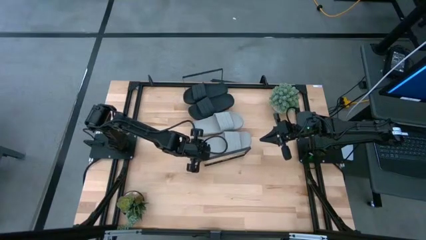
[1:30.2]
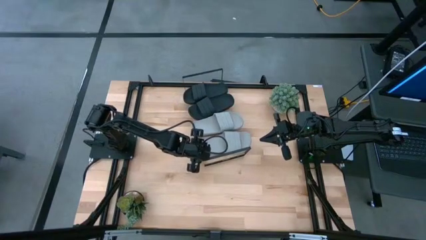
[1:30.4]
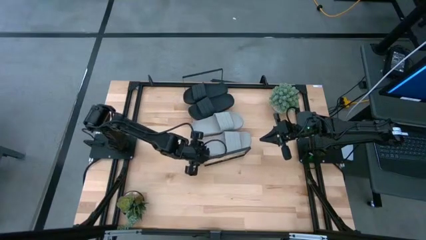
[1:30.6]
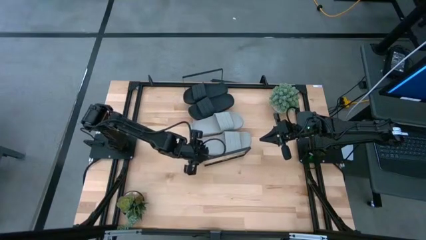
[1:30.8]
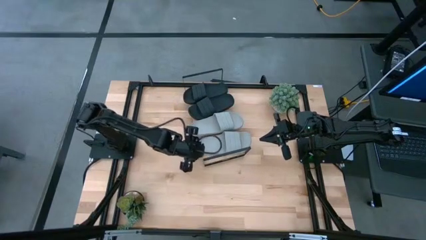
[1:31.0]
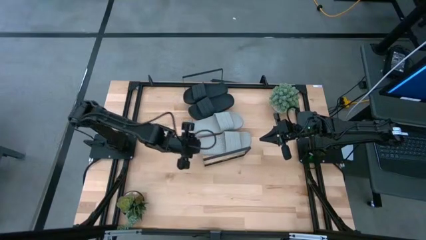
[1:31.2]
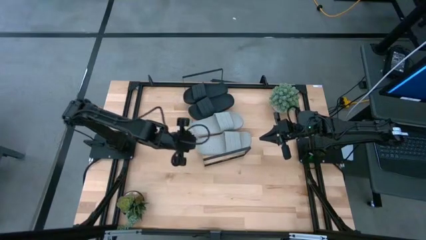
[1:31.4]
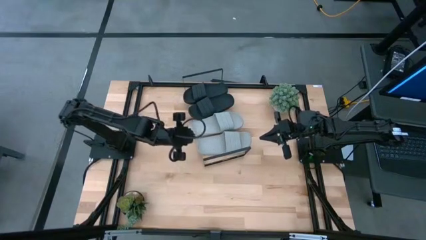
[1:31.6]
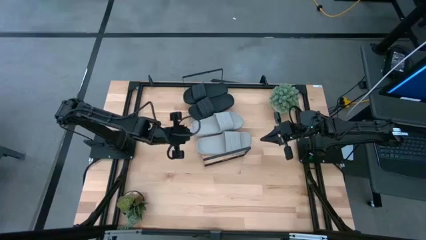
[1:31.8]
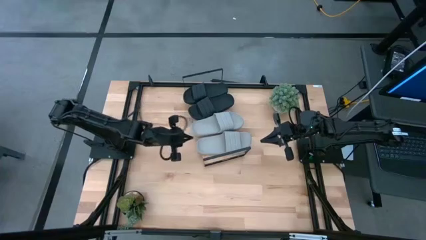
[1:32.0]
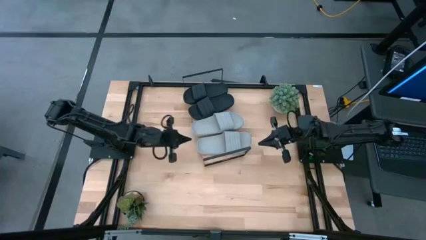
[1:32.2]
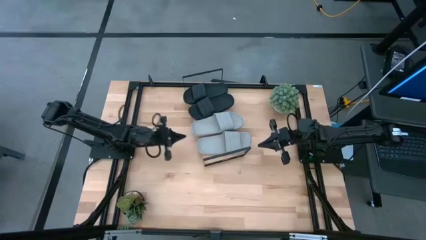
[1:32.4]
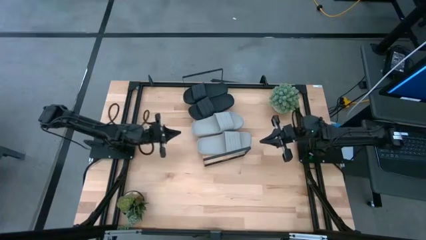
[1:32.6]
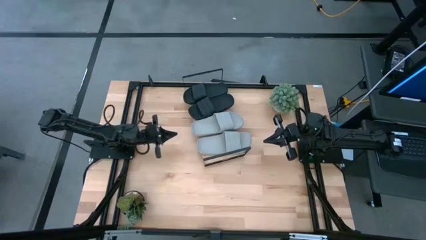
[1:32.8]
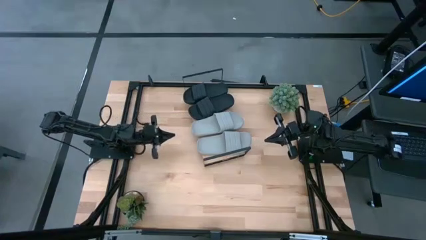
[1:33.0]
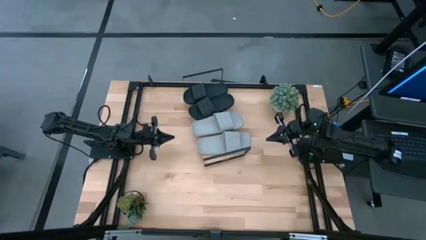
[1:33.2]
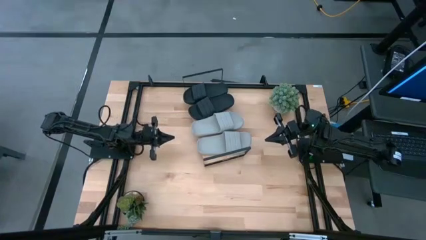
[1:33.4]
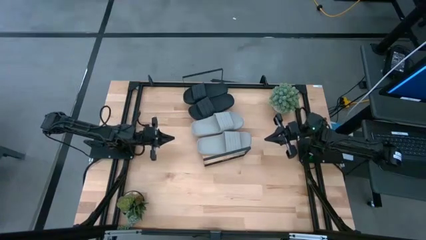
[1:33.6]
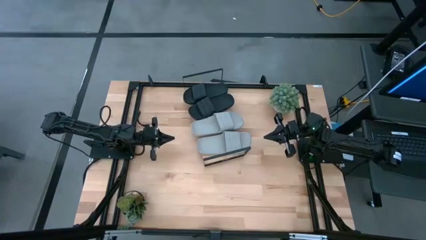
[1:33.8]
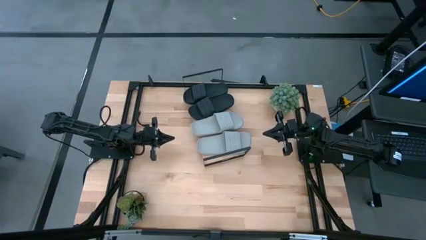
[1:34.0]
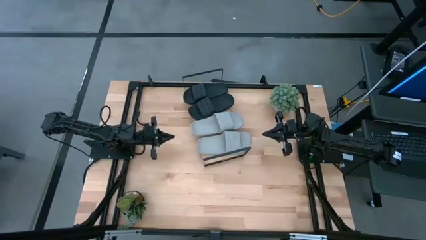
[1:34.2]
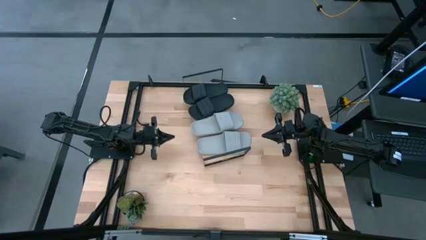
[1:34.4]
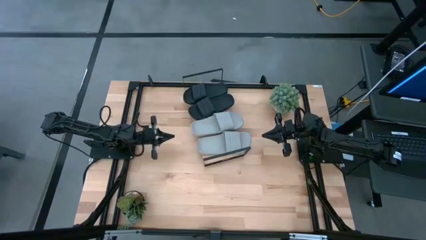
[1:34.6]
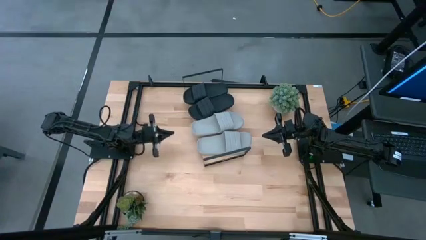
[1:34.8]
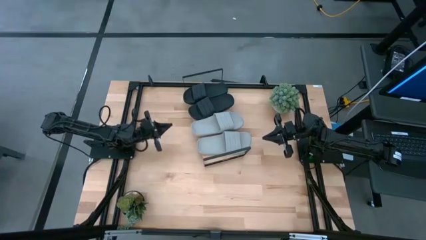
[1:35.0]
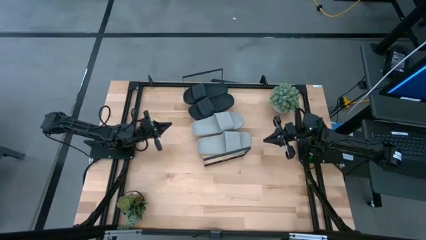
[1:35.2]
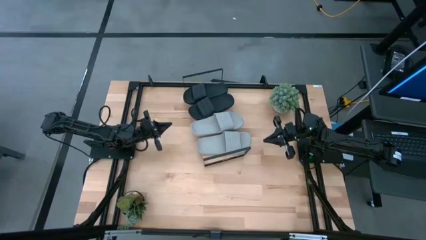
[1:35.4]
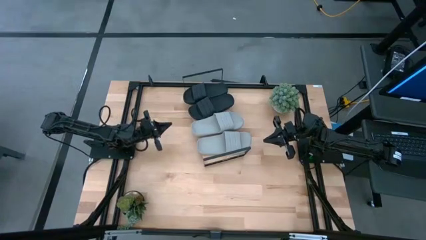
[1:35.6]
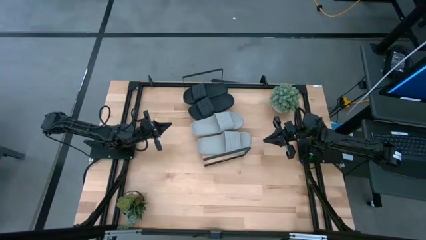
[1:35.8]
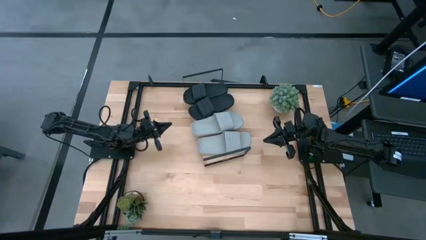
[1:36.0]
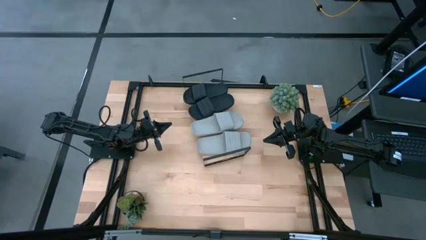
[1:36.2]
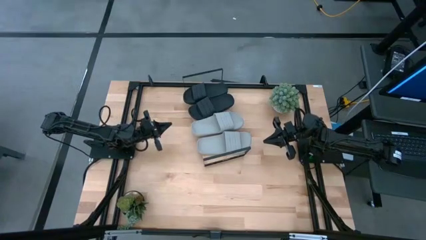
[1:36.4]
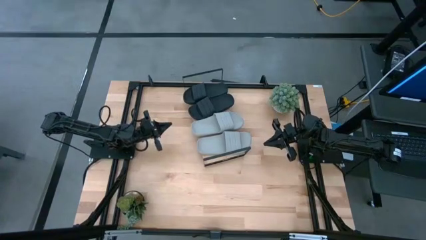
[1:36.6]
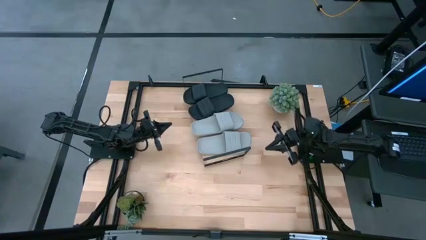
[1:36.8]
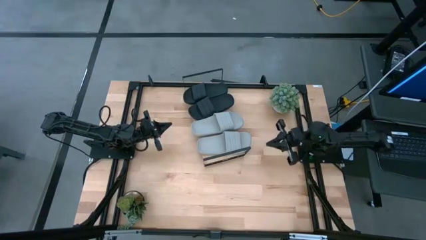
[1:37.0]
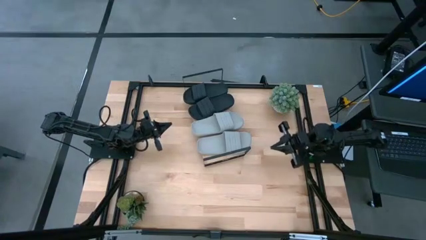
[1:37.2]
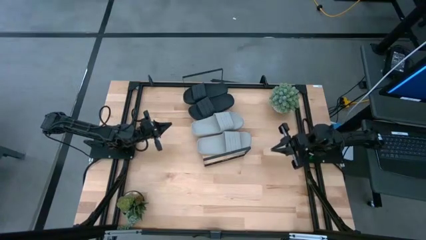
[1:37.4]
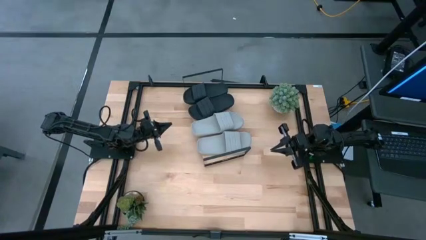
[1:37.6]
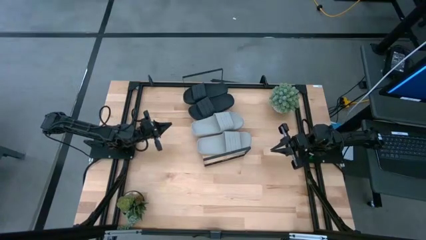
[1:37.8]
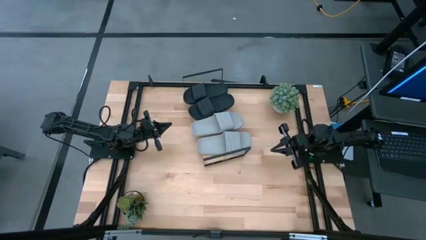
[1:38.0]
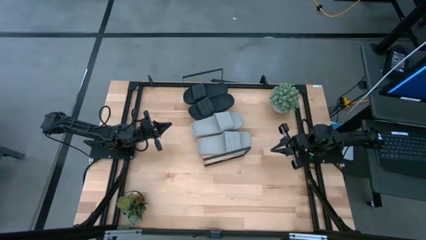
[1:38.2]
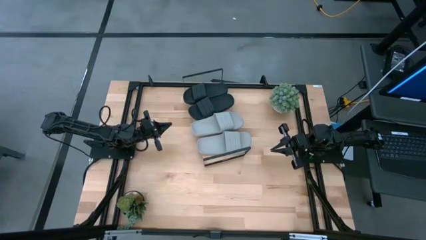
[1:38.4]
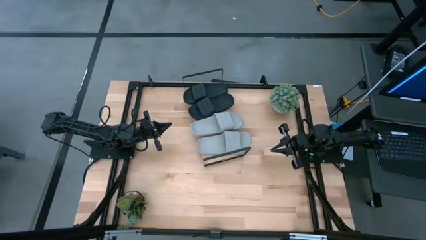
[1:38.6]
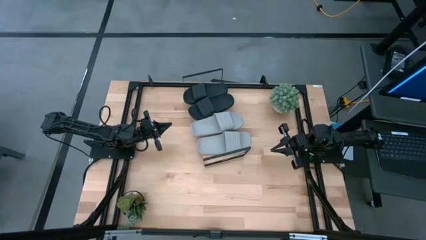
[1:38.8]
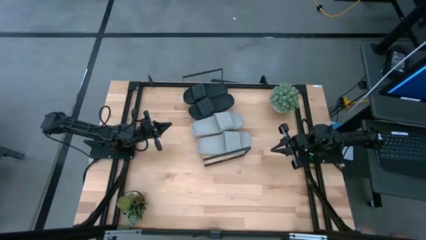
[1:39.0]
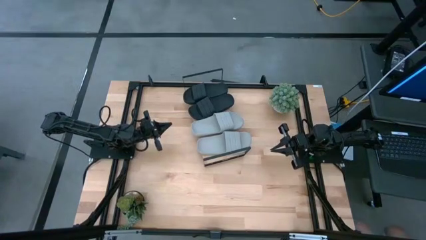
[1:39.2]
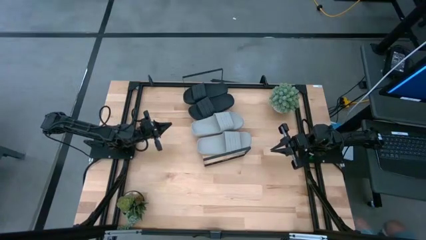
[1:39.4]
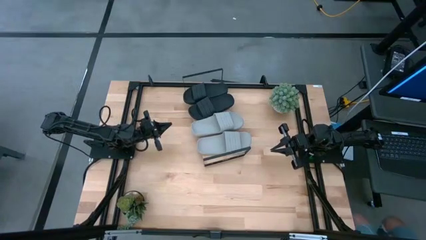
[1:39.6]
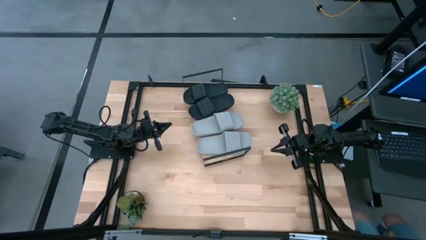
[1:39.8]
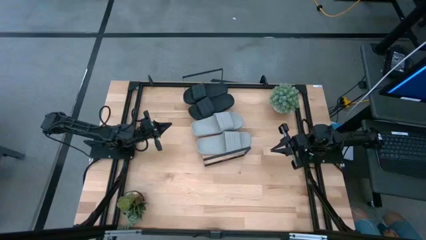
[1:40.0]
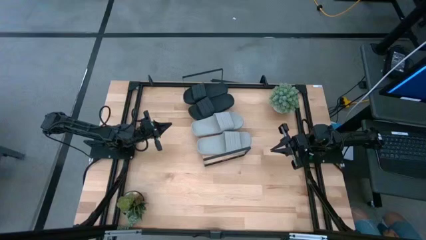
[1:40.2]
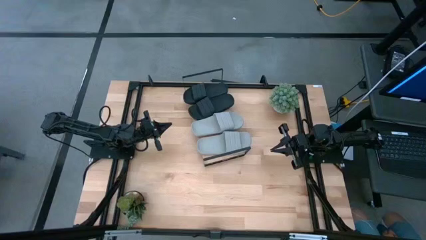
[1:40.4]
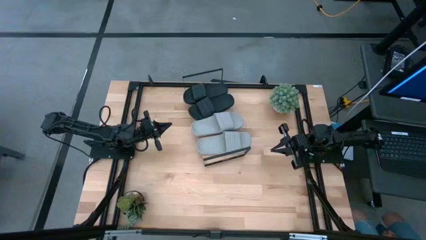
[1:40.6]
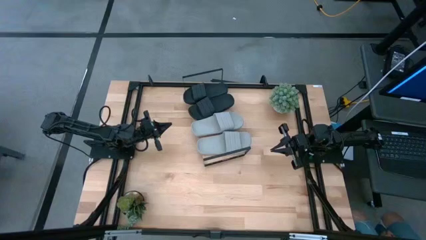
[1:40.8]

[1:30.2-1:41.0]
Task: Pick and place slides into the shelf
Return to Home Position

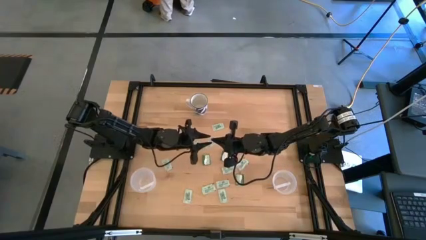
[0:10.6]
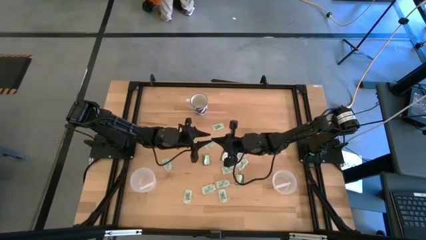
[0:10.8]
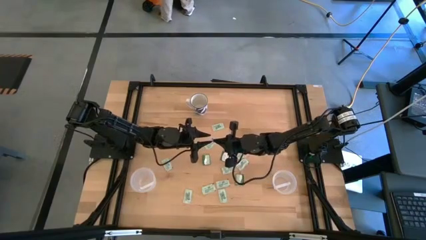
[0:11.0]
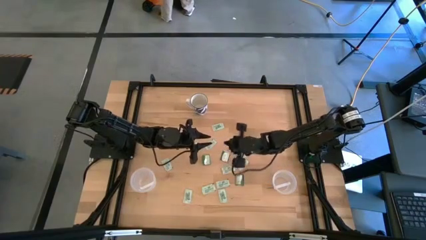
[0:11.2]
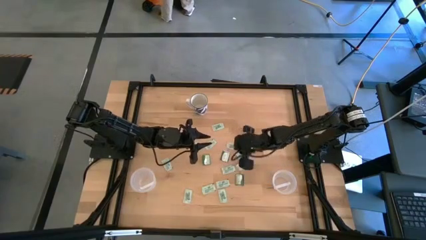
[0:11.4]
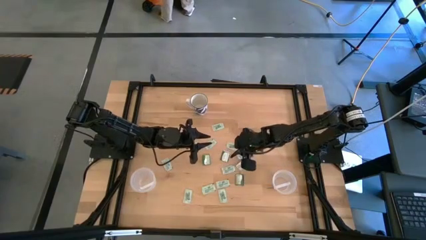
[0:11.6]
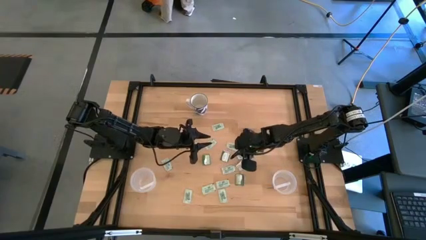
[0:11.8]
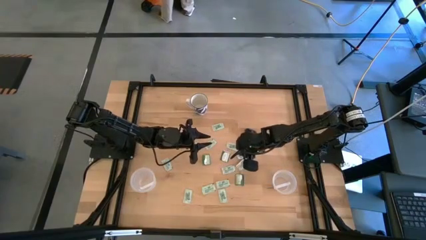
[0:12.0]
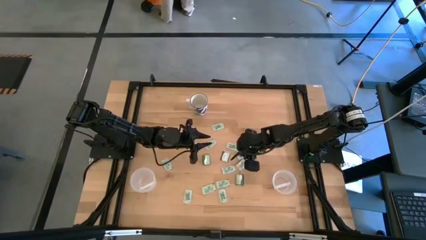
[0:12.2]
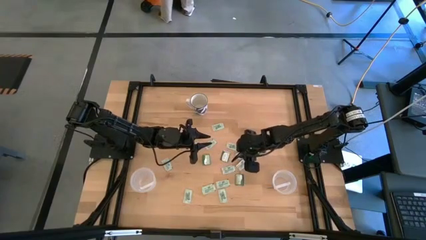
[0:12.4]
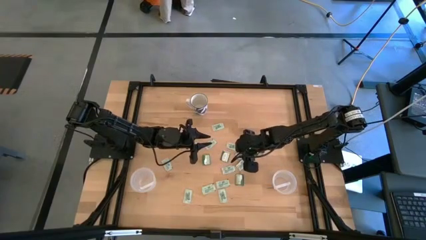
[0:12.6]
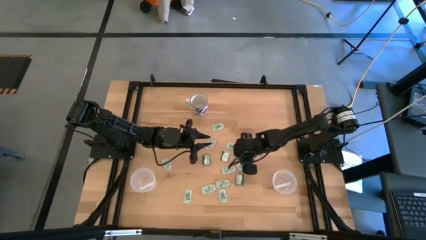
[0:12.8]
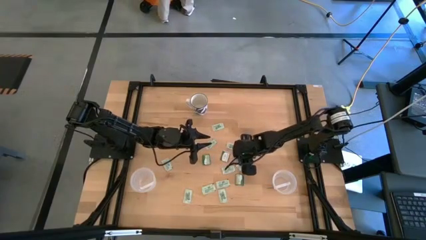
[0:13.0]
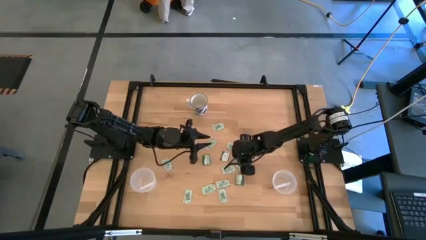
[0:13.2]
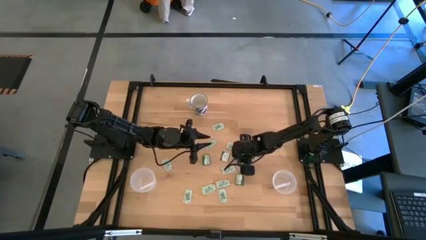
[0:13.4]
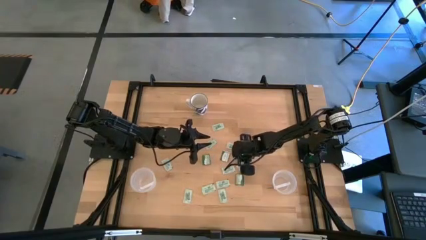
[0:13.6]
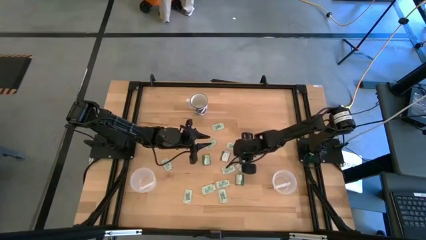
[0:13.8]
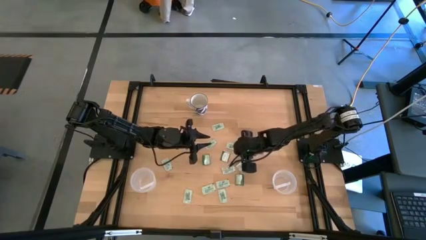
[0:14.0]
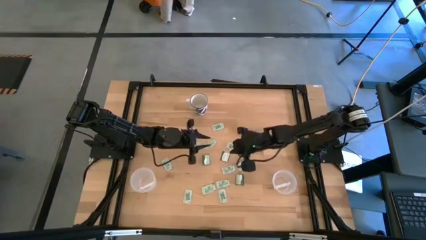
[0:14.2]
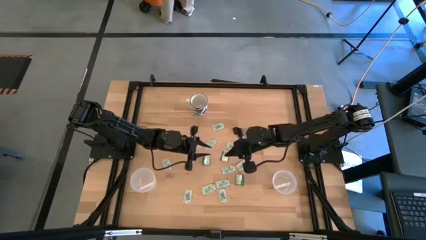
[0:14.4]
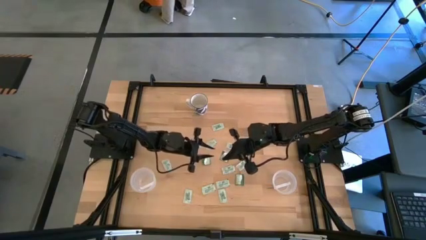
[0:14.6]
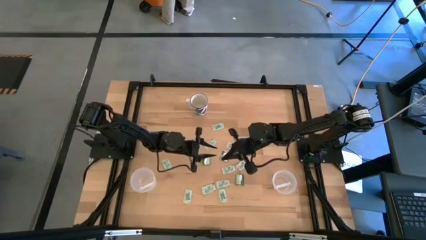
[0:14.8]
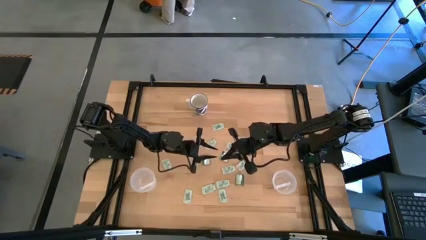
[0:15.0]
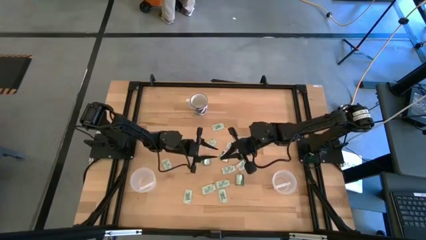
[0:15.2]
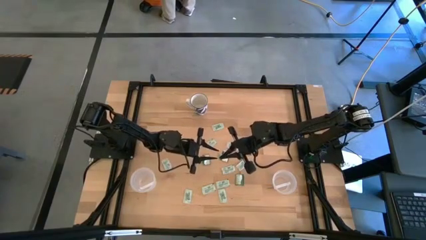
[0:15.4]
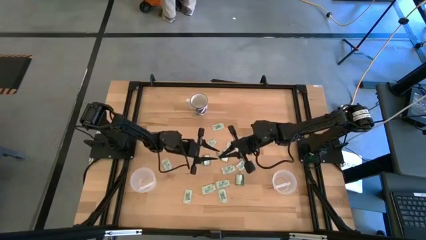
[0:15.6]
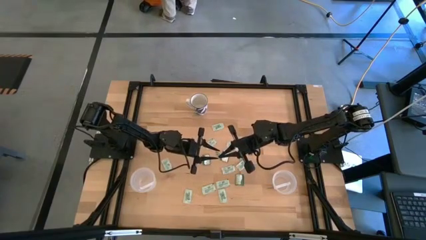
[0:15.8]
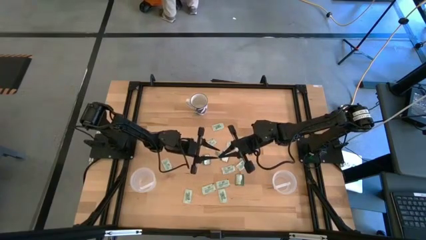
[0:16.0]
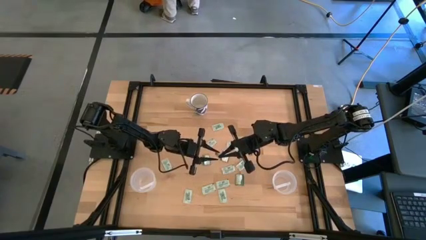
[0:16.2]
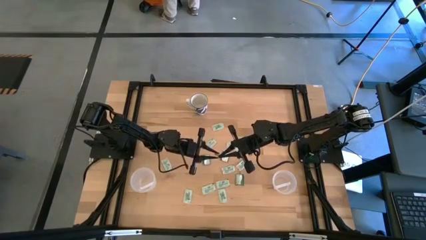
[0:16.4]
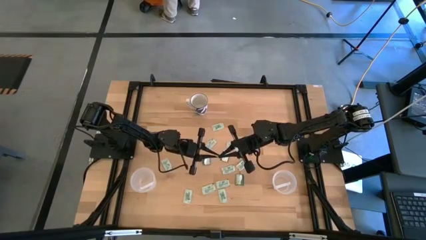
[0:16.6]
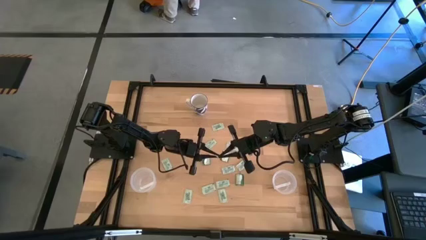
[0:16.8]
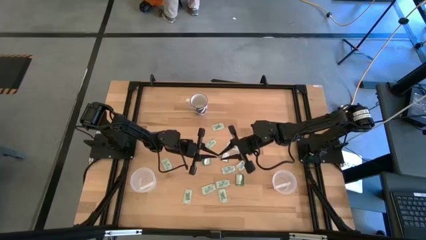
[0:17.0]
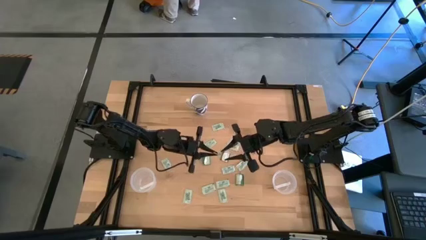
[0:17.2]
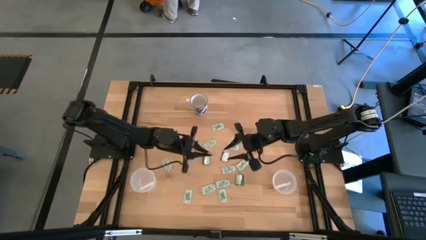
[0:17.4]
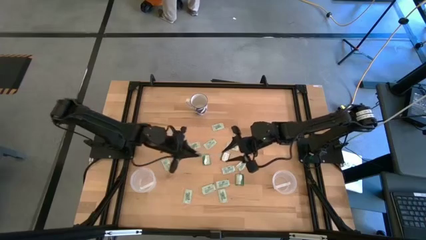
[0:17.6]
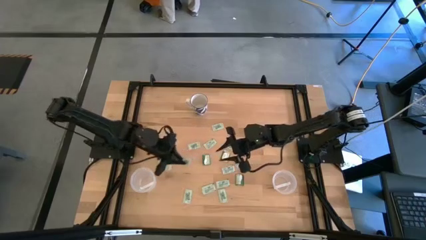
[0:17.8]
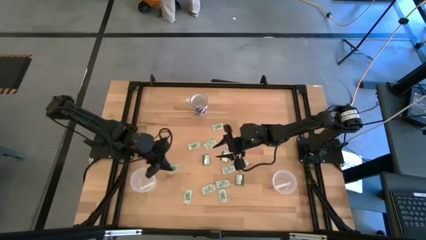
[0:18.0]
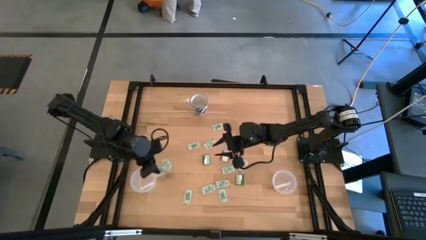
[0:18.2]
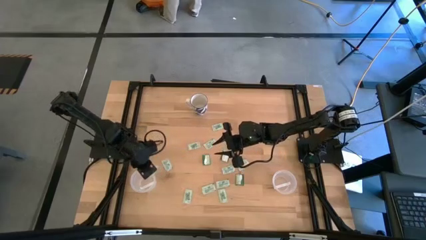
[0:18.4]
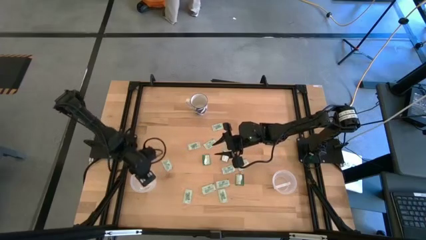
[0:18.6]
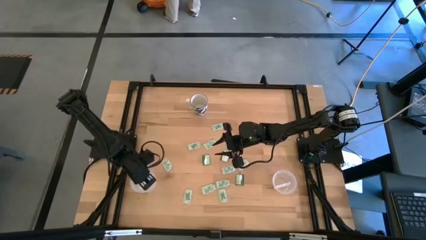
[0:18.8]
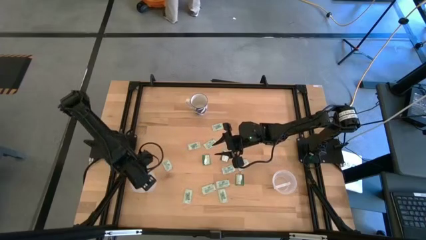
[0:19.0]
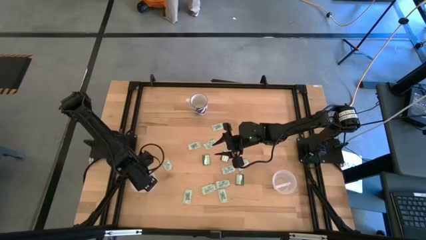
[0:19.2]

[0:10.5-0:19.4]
Task: Pick and place Stevia / Truvia into bins
Put the light green stevia packet into the left transparent container
